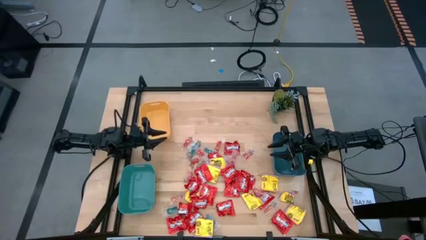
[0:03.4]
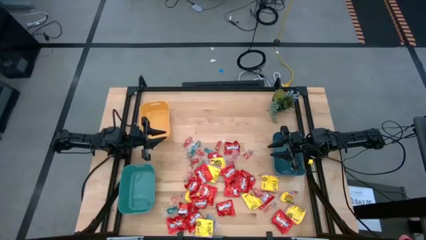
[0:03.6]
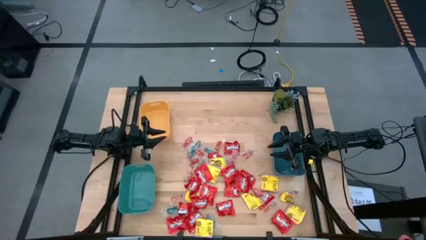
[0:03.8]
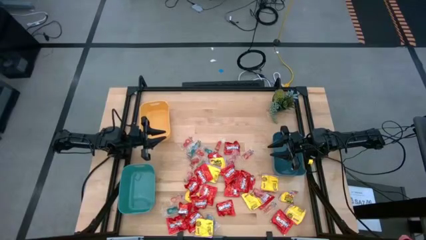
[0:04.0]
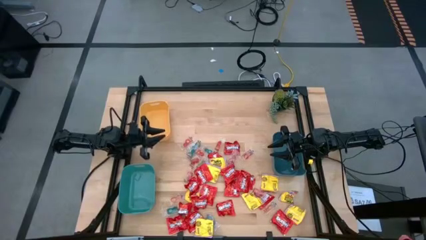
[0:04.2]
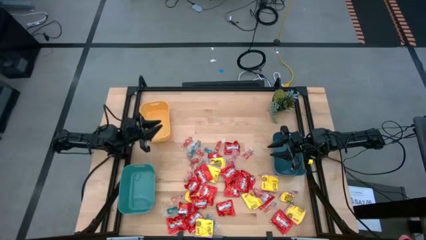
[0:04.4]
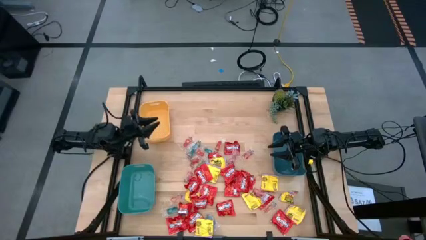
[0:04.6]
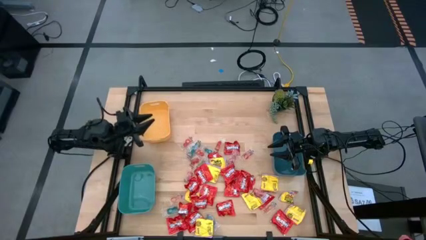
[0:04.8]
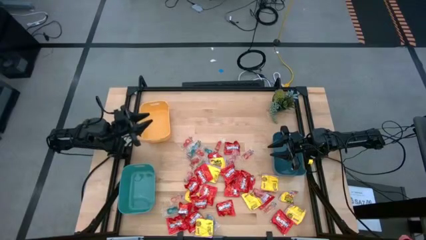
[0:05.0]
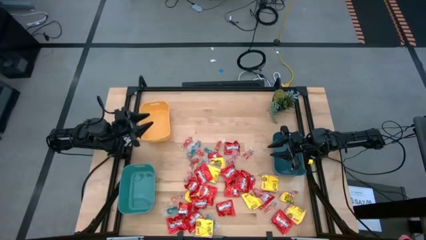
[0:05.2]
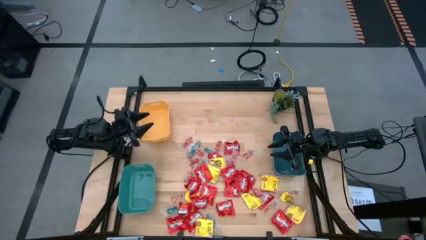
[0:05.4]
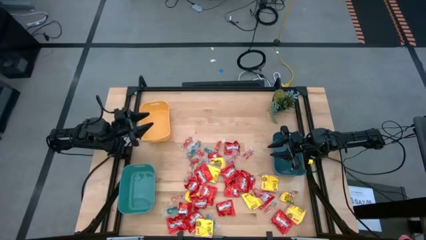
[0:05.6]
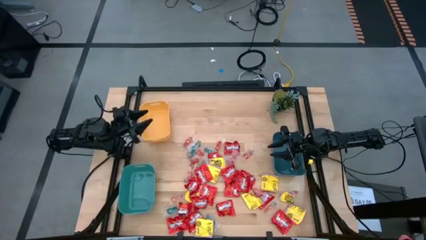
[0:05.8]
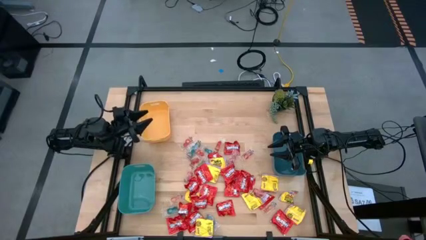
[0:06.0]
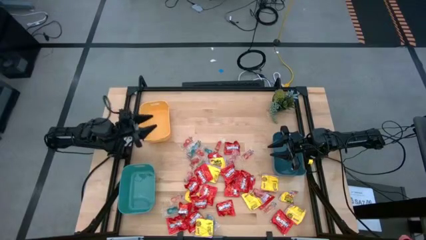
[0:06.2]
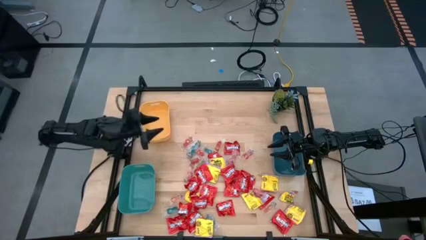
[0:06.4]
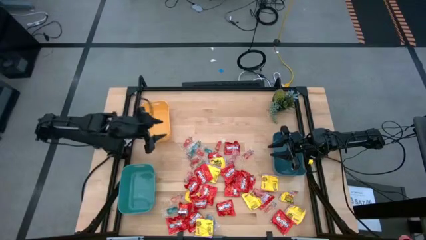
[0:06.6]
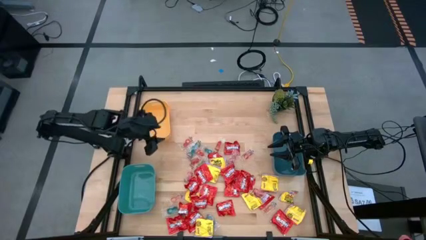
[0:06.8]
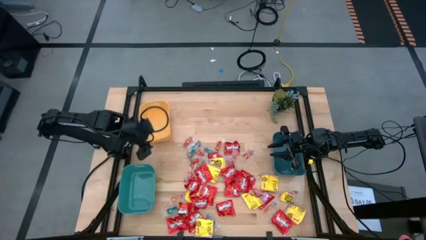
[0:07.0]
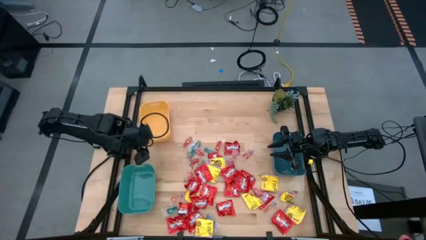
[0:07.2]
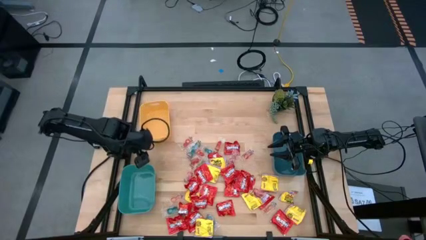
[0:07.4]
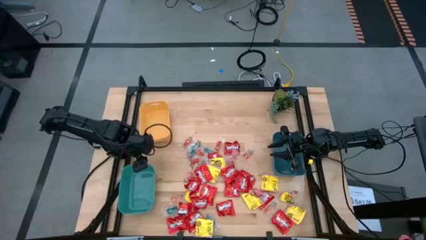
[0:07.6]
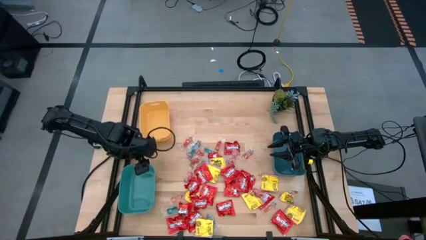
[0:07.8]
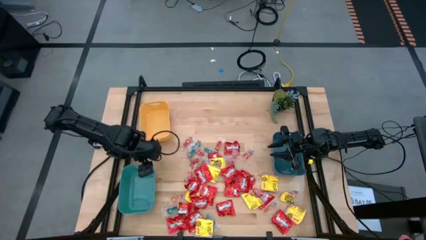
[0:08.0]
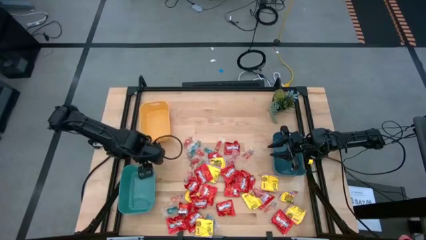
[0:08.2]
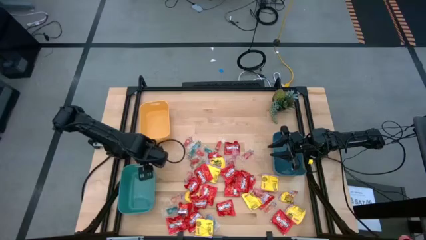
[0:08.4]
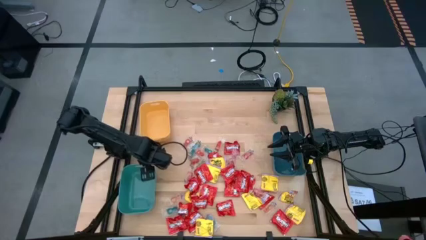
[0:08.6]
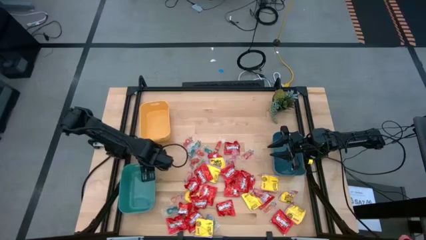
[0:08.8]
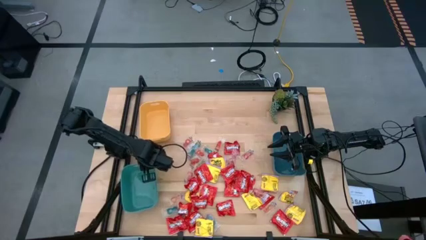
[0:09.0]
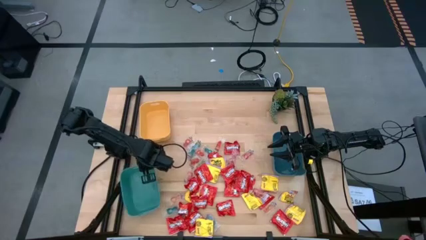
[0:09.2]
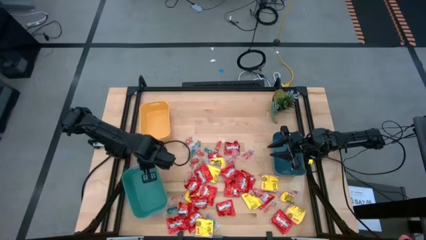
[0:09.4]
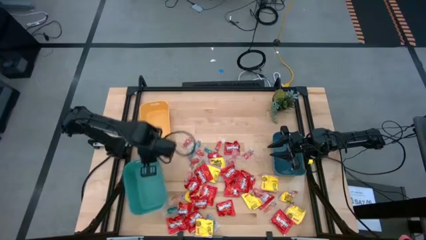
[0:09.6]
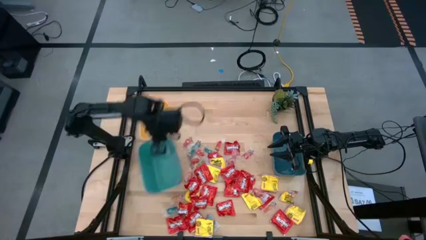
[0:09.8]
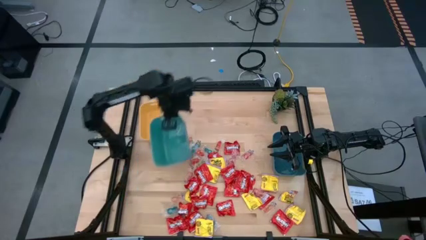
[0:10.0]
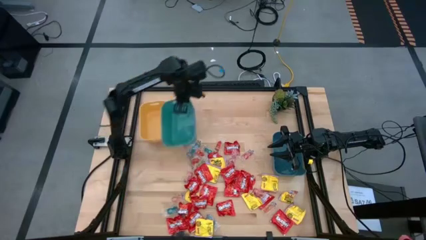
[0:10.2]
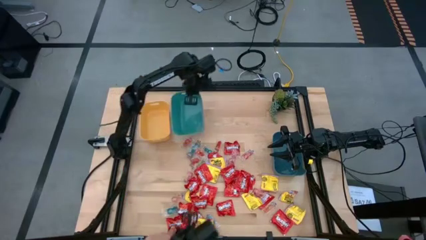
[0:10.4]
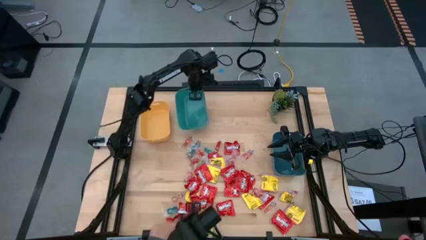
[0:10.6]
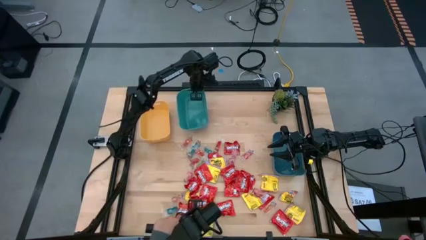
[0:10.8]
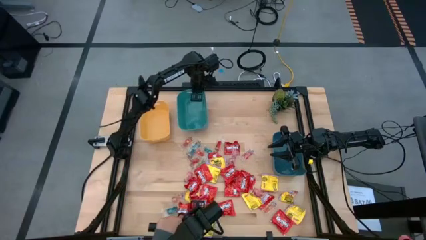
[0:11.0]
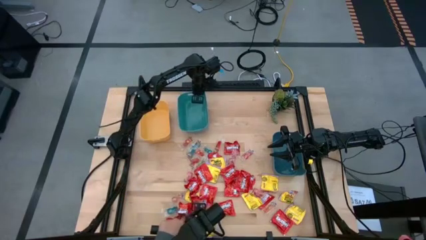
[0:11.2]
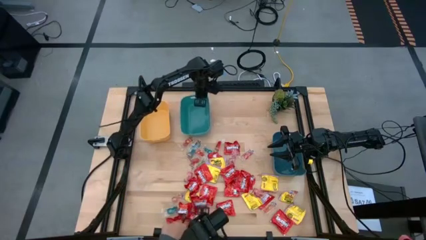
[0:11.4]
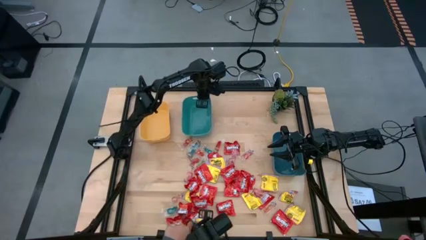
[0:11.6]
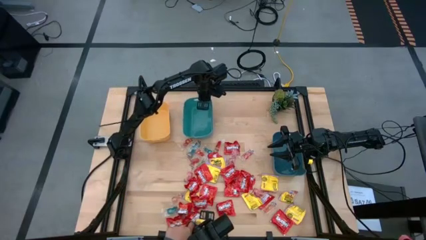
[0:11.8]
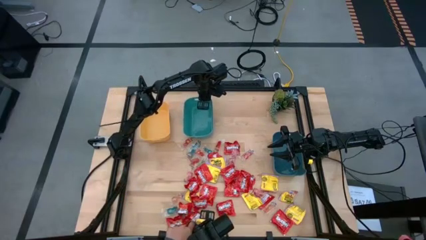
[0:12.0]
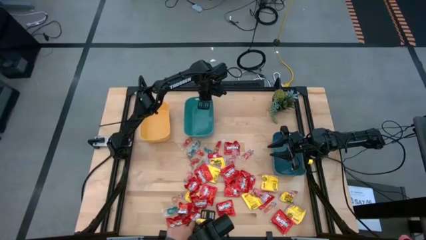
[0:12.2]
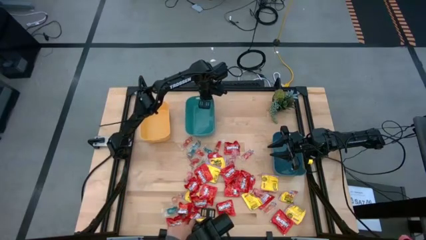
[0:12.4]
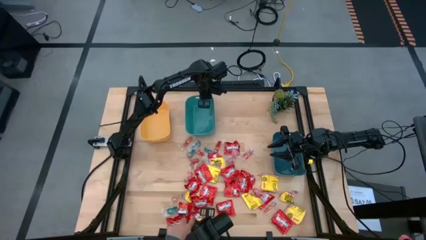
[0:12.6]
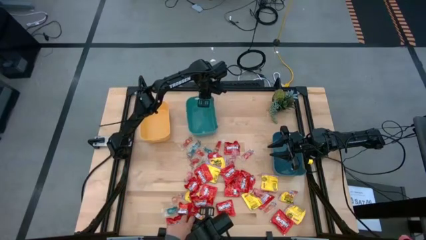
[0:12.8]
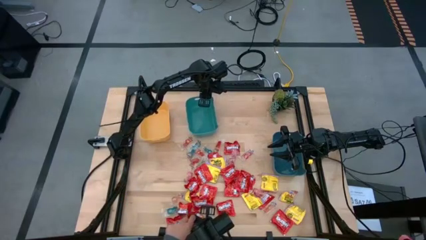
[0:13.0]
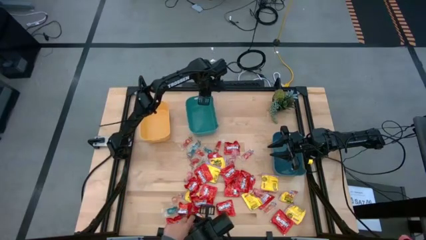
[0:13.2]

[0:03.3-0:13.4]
Task: Sort candy
Move the green bin to the top center of the table

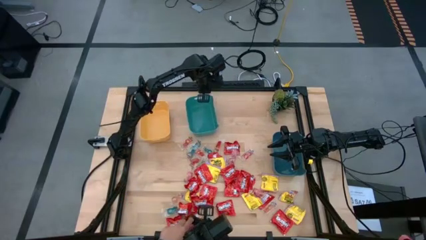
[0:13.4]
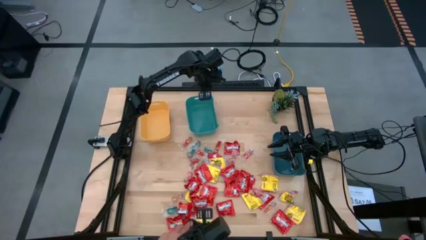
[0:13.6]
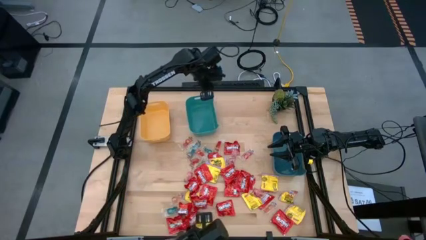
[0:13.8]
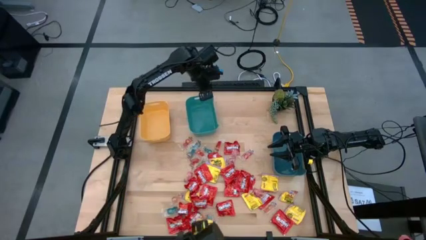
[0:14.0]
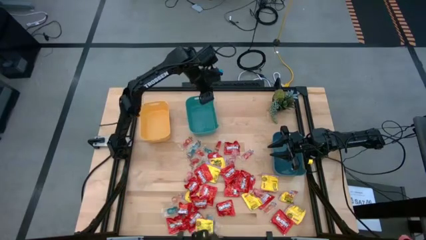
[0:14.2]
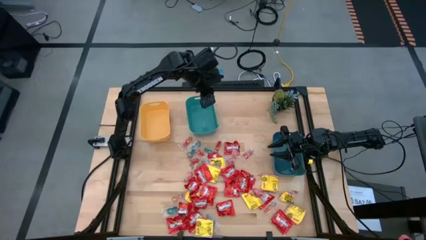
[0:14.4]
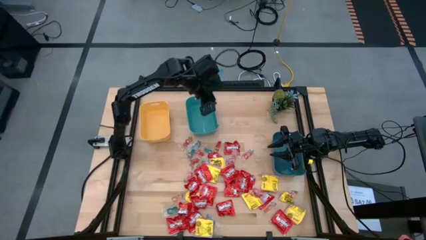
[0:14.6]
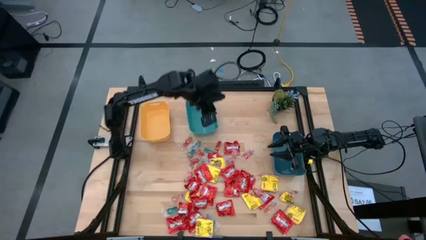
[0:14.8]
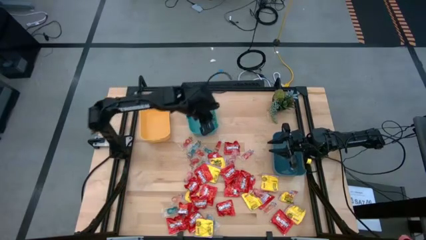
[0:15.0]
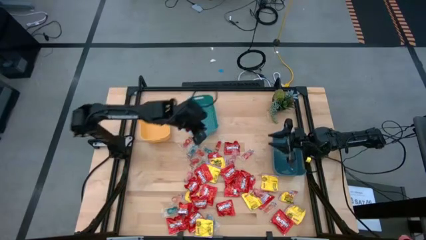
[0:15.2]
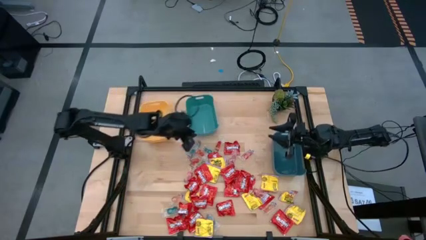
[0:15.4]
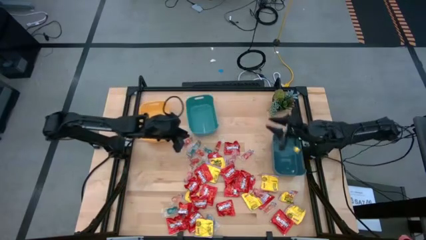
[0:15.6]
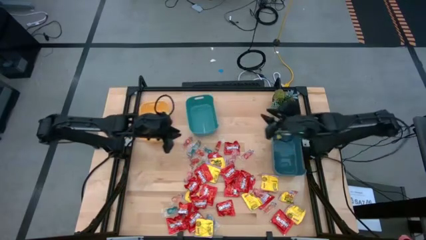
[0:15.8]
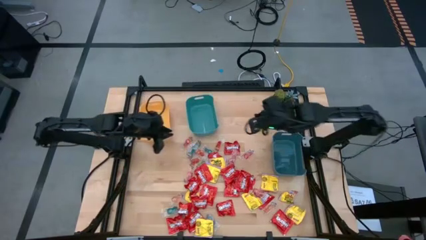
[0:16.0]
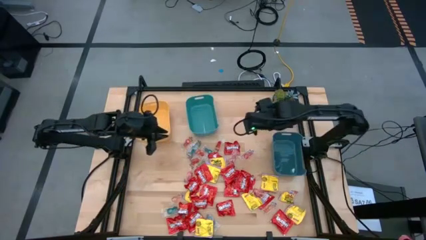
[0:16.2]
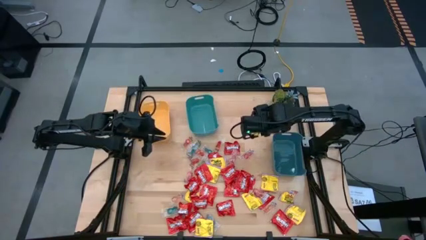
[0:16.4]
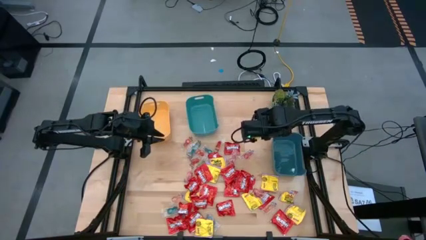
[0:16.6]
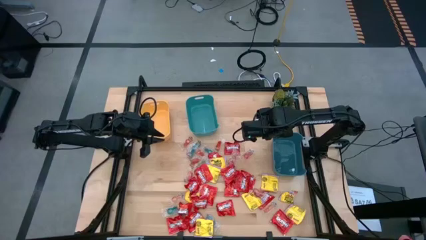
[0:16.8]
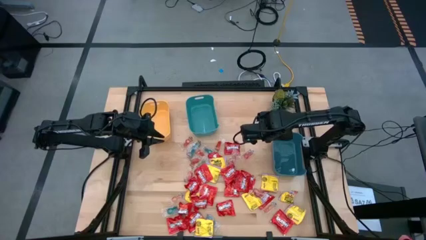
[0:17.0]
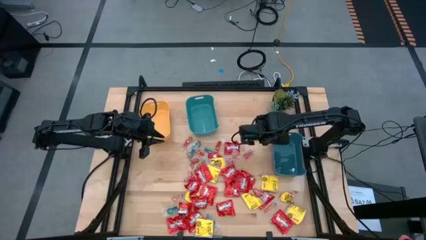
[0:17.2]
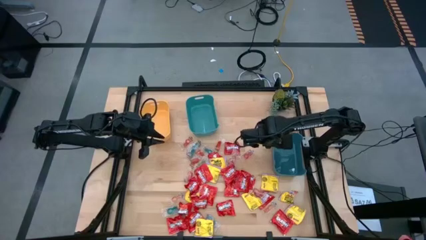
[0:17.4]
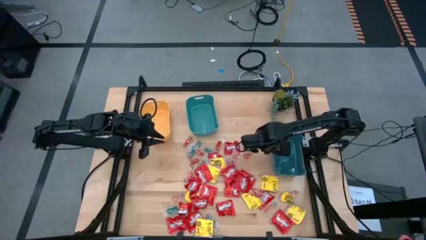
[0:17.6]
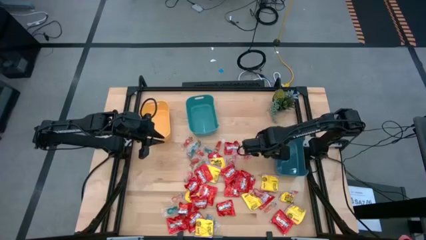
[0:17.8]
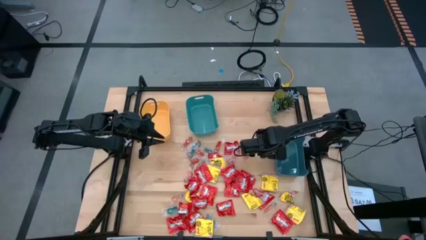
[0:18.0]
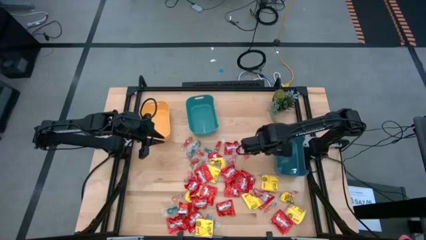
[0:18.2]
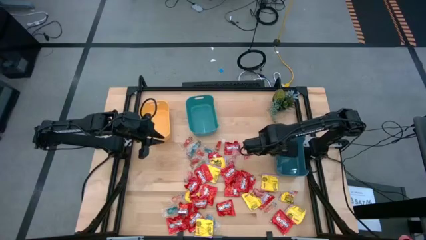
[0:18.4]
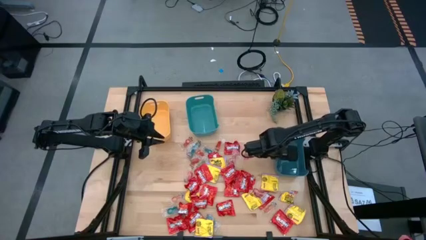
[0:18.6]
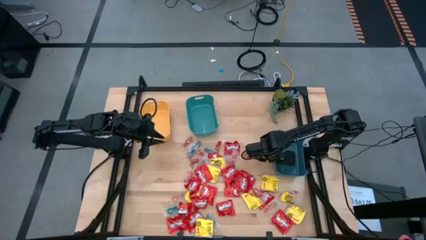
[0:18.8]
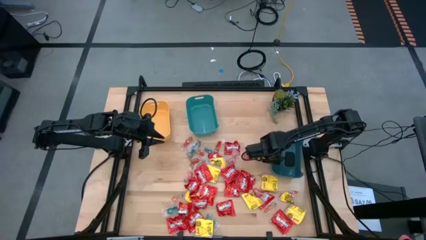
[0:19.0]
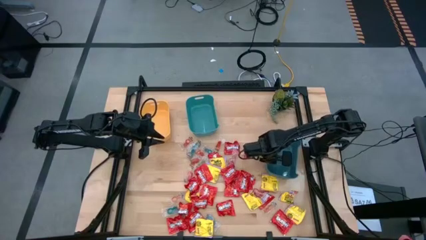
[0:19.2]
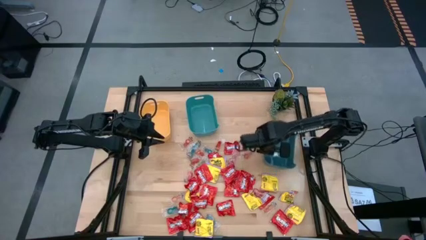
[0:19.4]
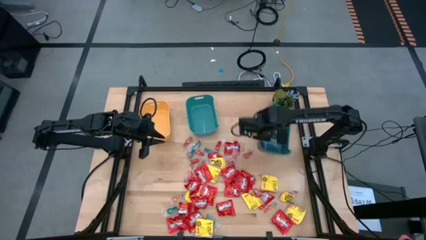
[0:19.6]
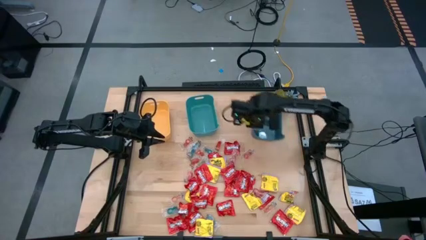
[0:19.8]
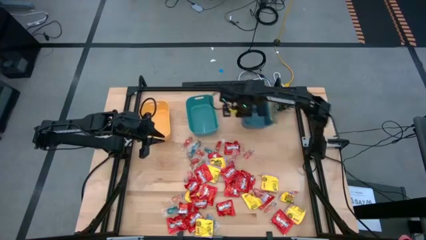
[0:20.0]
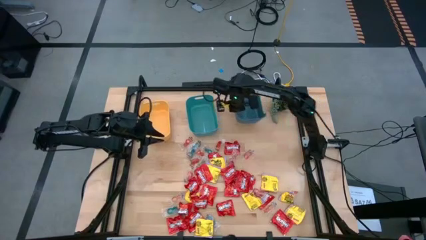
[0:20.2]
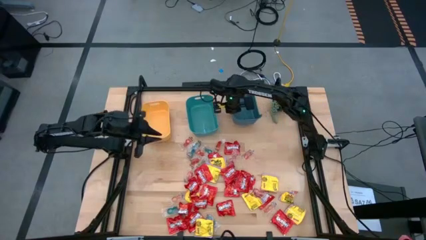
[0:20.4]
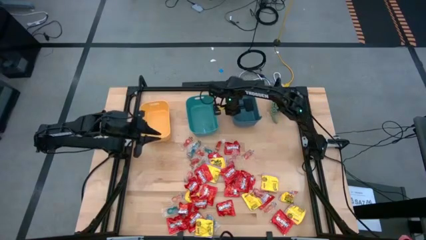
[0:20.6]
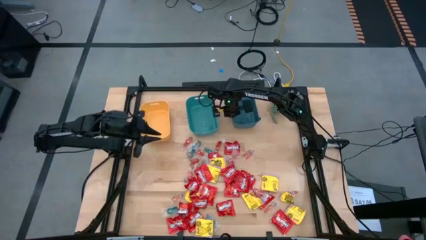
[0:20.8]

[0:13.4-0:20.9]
Move the blue bin to the top right of the table
